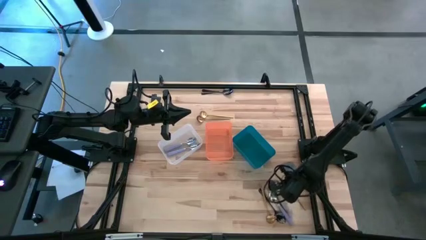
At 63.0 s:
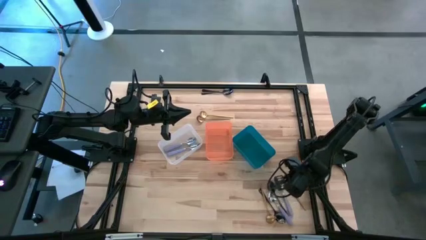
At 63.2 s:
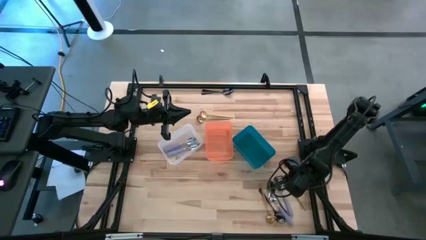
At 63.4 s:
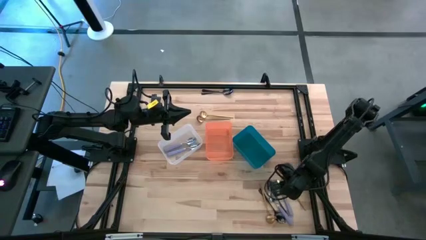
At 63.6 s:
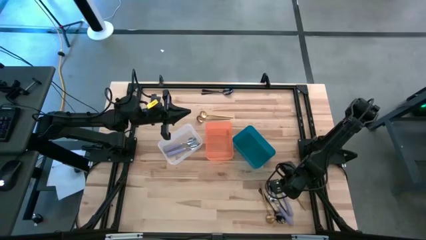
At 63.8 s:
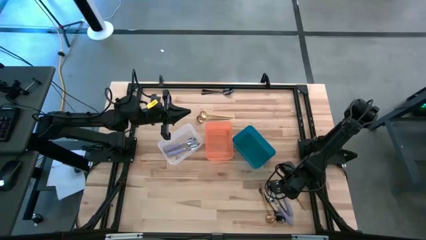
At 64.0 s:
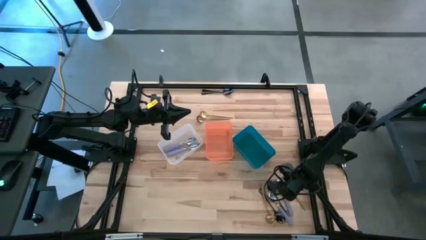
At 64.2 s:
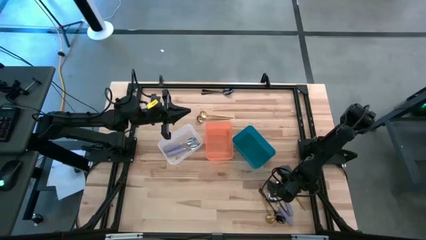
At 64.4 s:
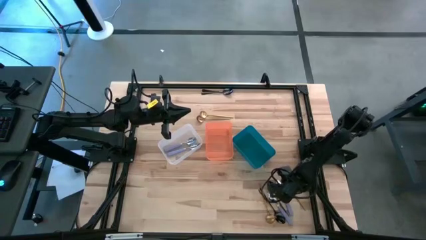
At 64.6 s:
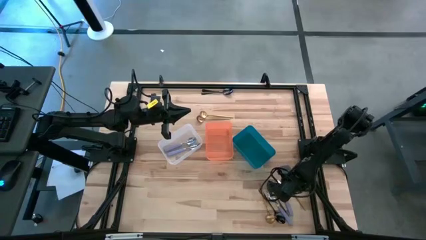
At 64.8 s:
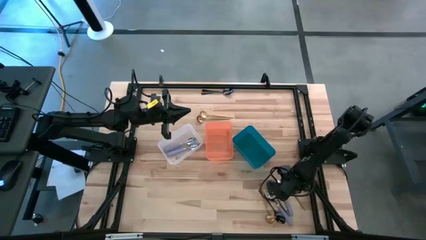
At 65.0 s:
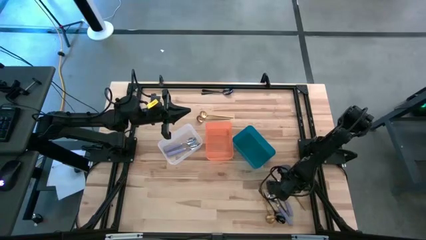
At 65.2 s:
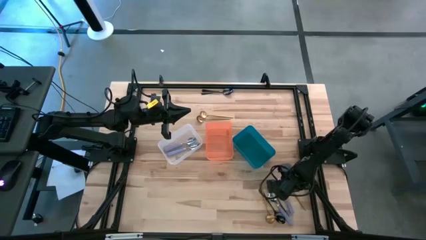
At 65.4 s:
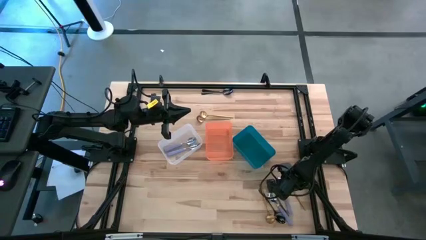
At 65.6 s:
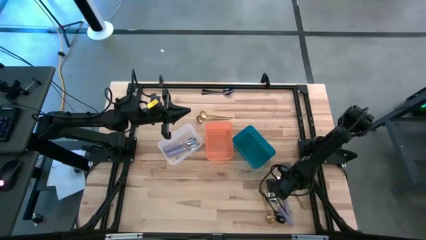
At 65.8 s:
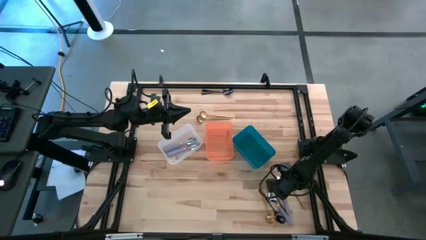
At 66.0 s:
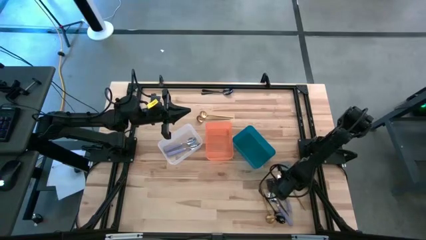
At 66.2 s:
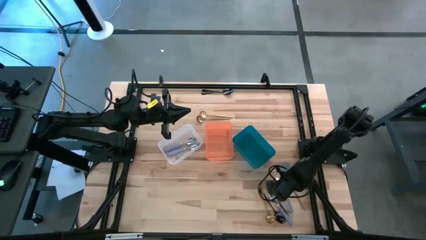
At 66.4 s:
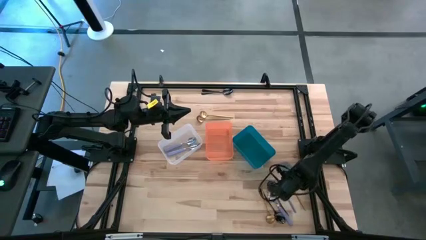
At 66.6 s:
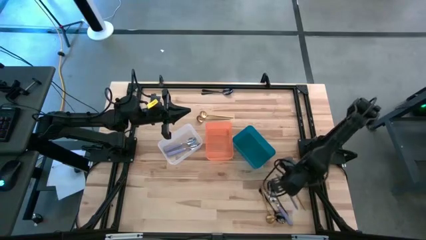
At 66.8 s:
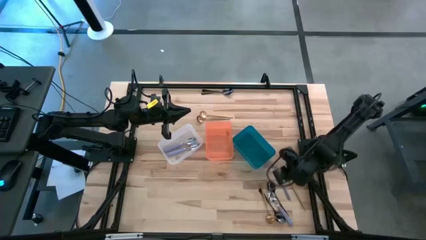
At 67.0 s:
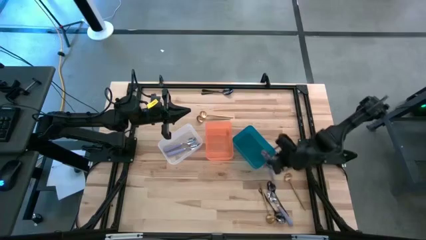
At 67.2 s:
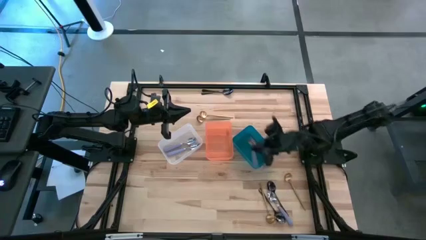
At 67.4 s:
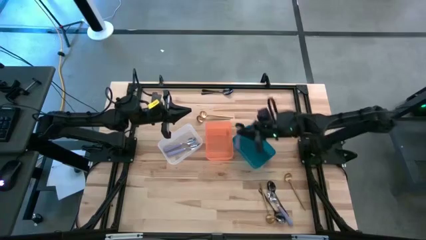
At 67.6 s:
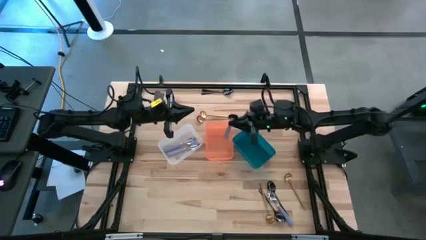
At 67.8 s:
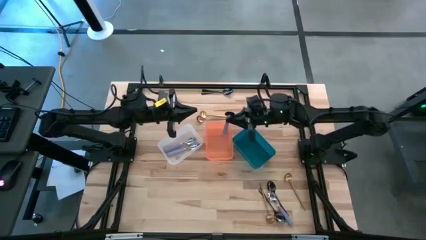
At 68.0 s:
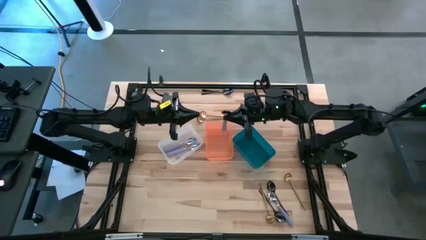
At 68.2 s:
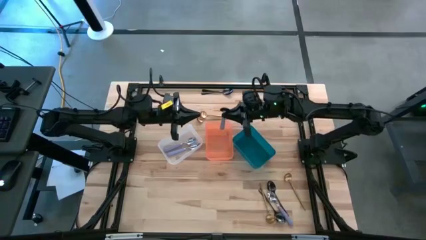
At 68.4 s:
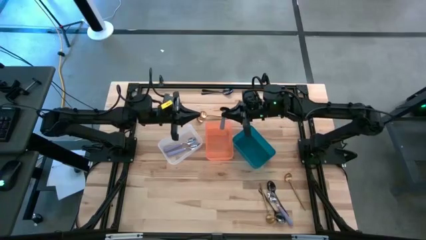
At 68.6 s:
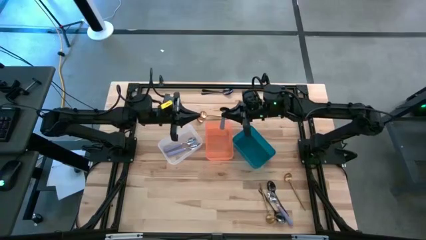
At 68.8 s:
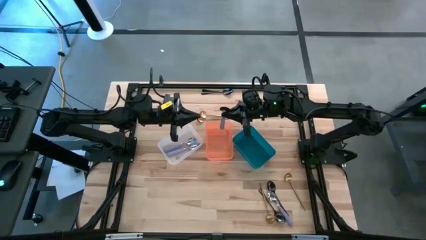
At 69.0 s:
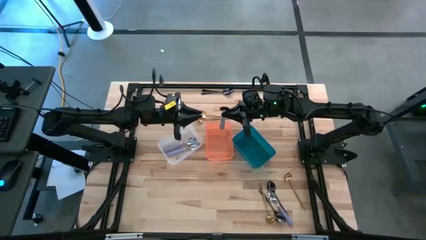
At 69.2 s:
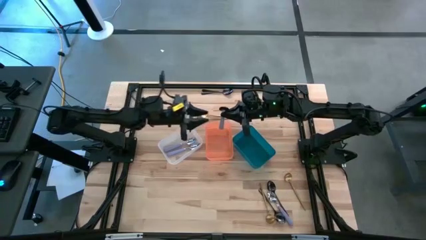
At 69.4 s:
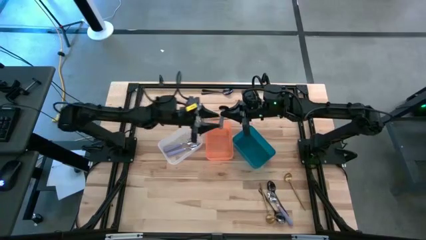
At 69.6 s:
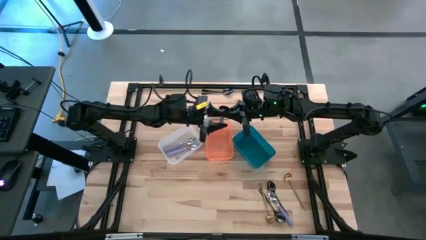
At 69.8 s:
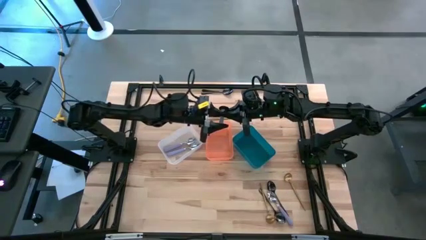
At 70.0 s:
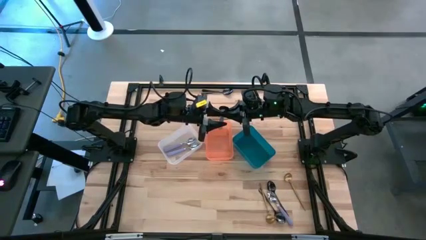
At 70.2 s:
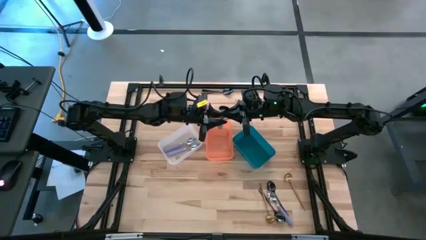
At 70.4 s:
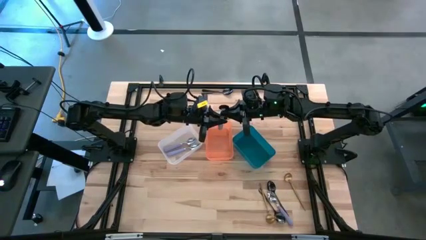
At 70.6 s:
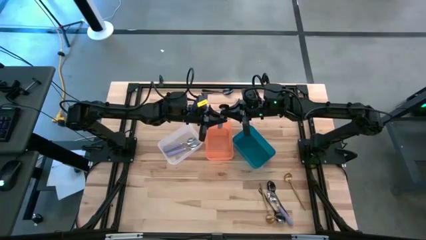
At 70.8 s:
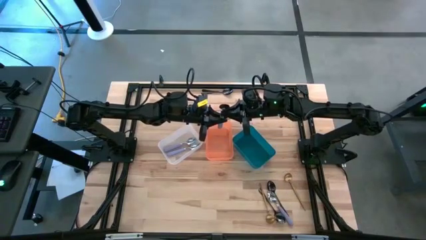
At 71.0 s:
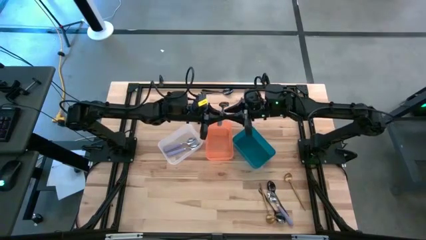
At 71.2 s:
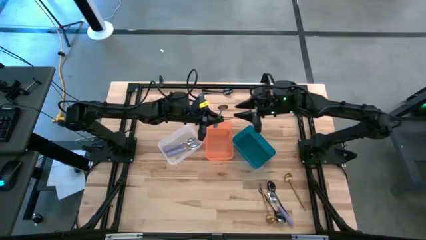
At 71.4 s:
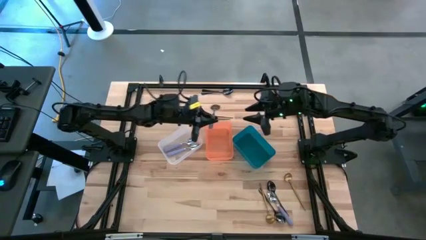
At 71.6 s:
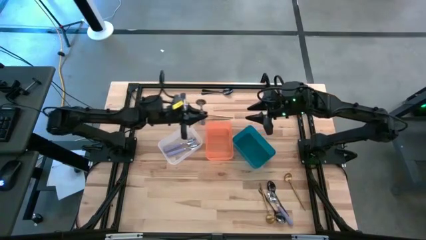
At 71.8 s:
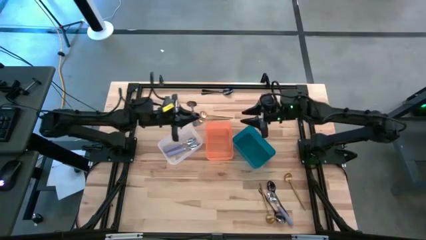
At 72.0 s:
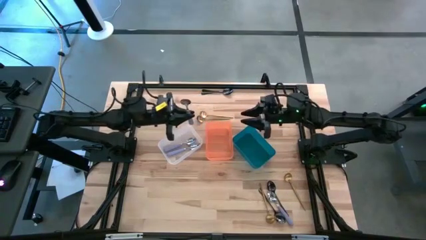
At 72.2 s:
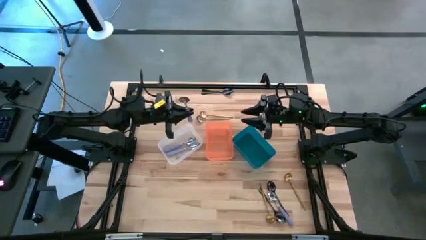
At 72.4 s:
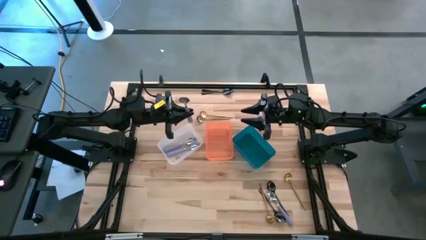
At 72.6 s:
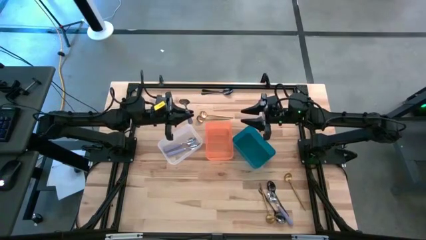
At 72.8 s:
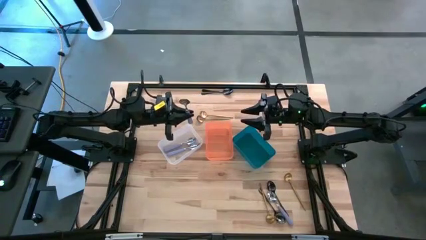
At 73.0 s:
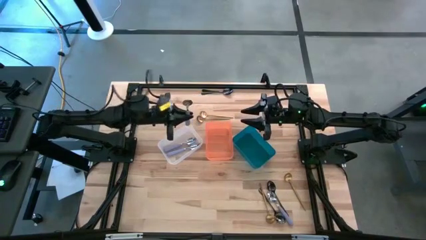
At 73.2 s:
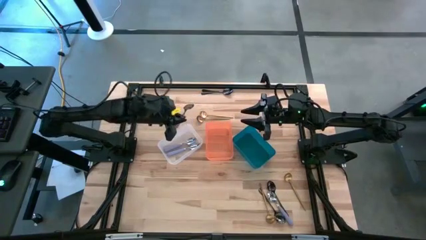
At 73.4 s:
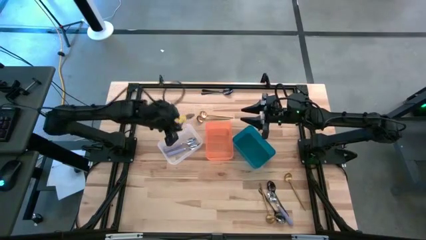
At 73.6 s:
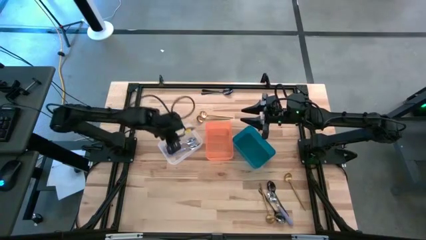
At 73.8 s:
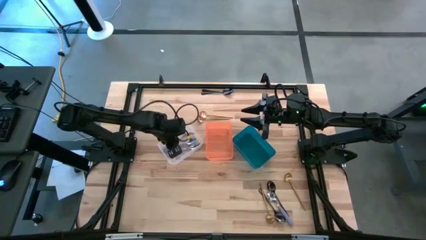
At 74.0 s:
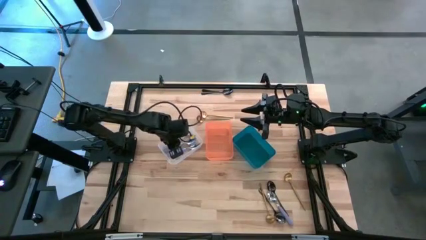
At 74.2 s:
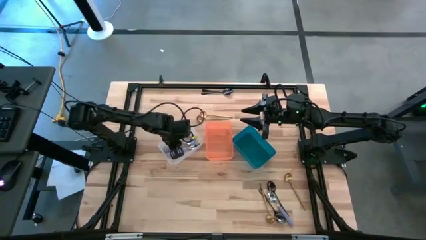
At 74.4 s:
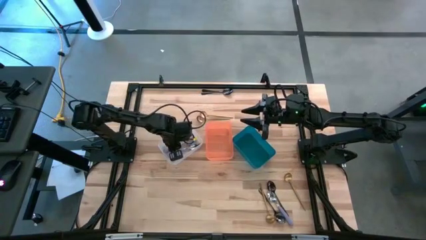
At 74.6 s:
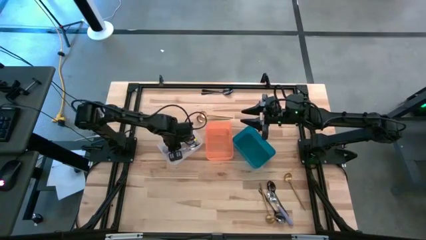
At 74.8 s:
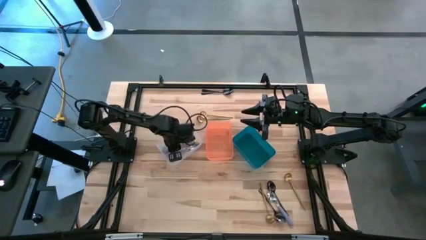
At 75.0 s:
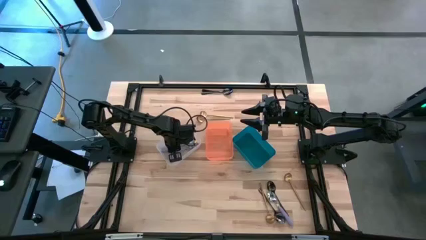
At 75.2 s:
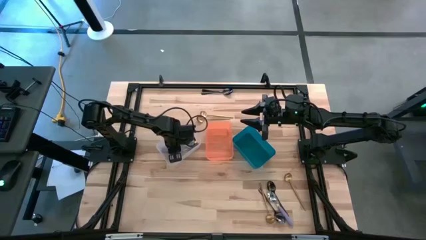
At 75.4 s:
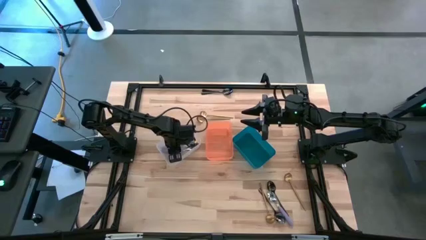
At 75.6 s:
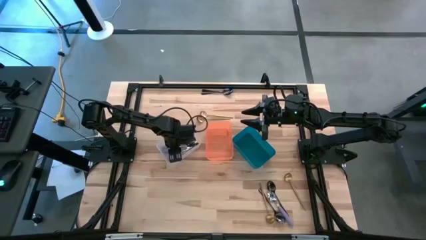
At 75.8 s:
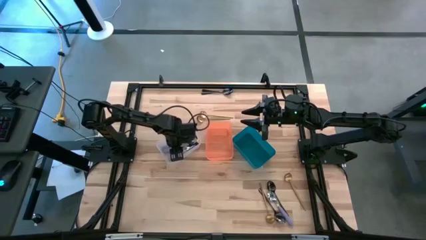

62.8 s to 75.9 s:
Task: Sort silverware by color (type)
Put the purple spoon into the white bin
